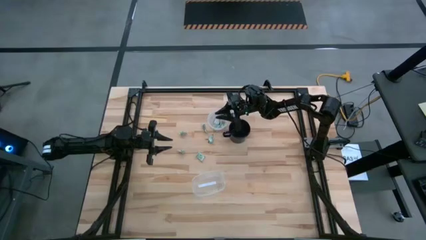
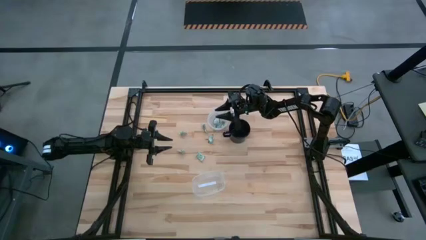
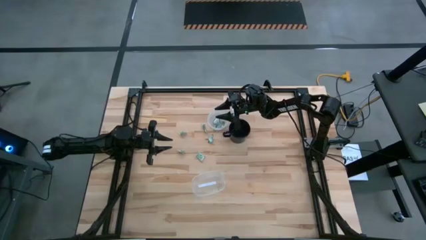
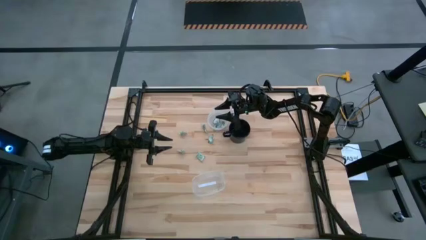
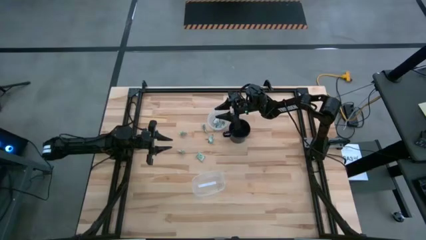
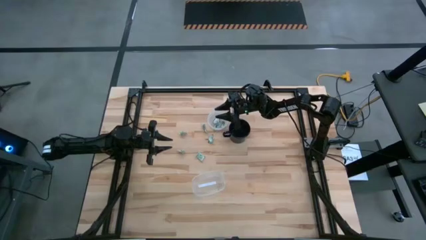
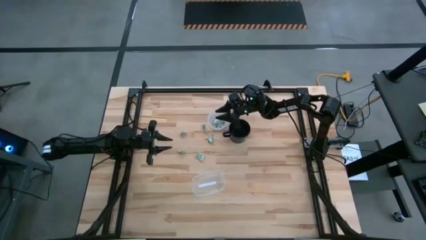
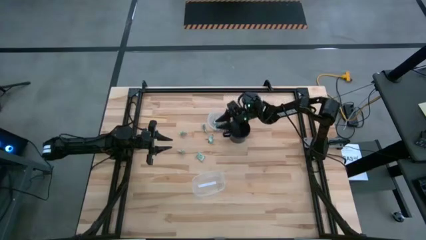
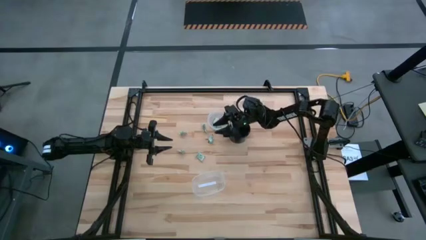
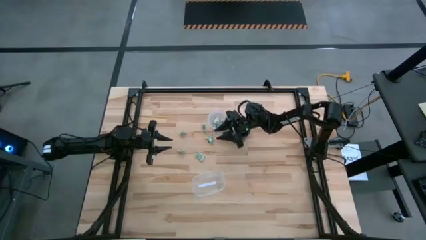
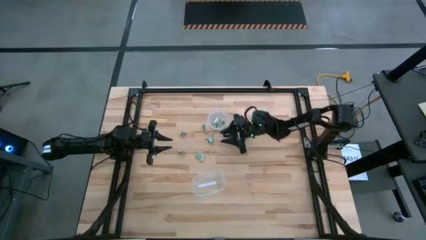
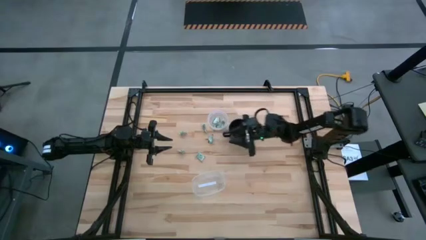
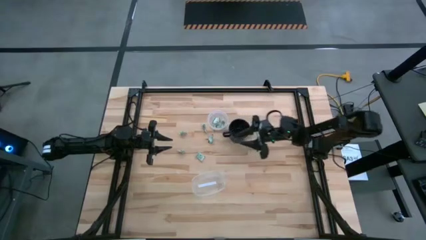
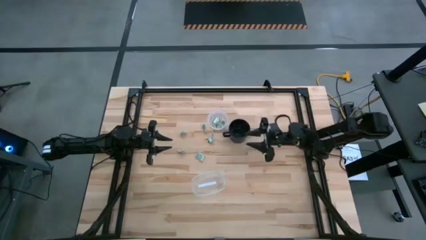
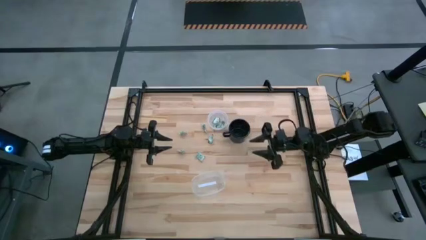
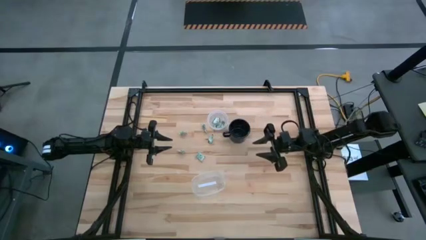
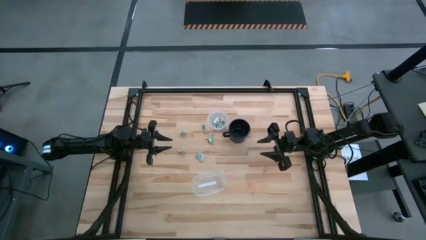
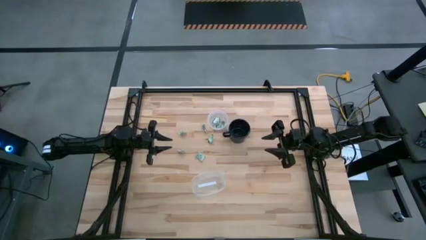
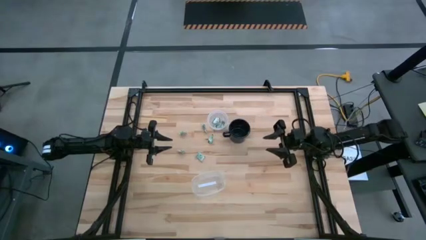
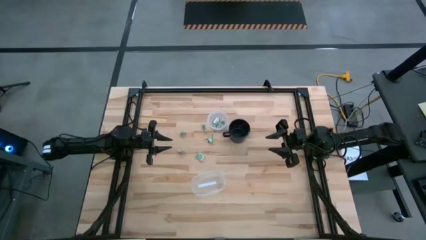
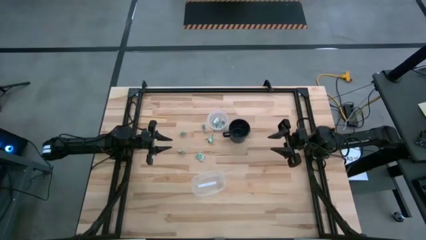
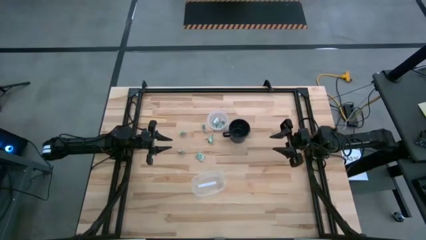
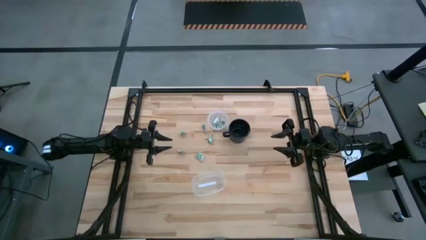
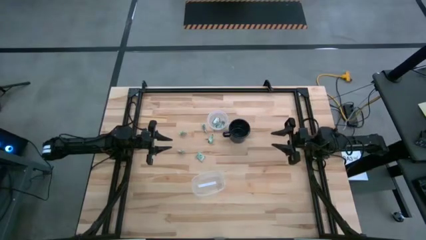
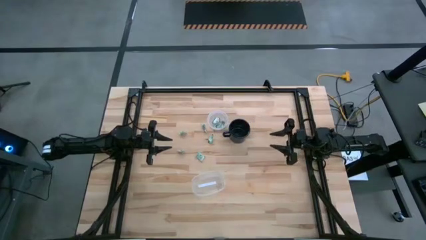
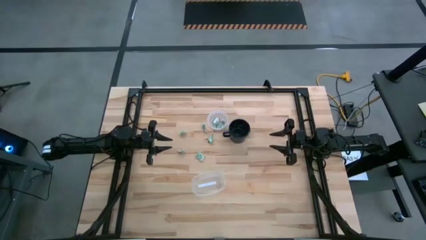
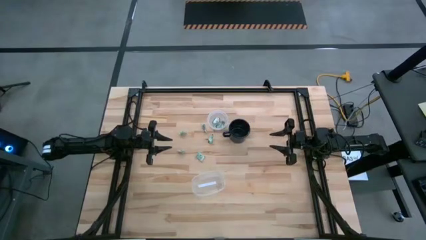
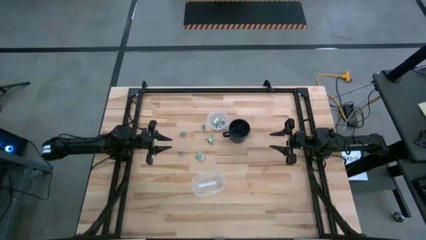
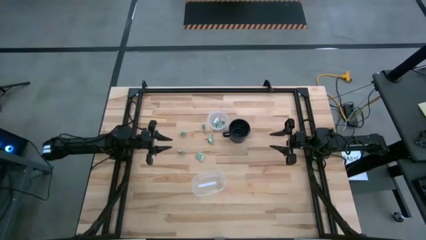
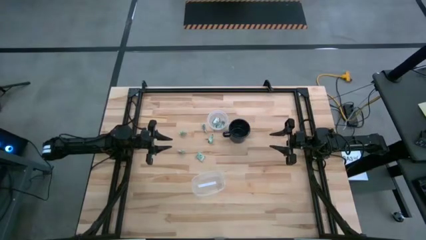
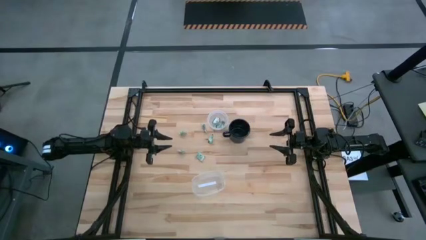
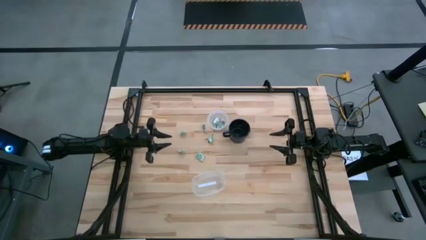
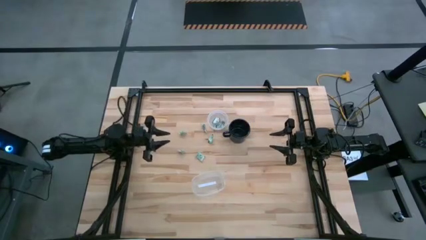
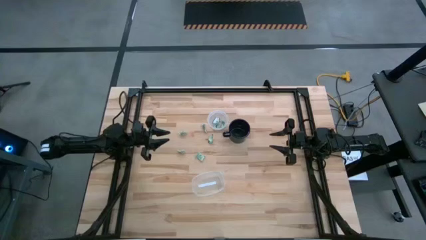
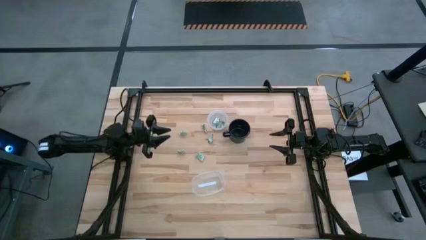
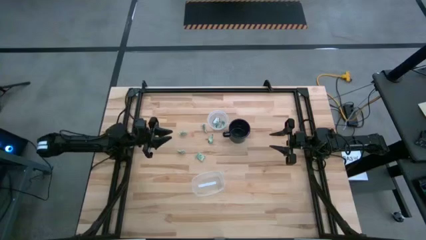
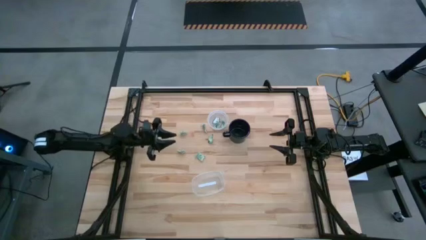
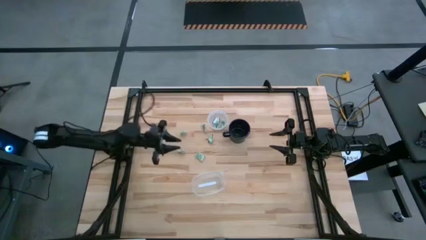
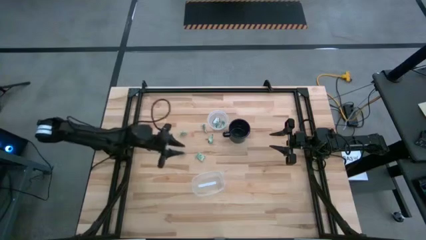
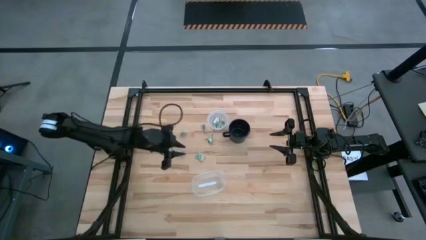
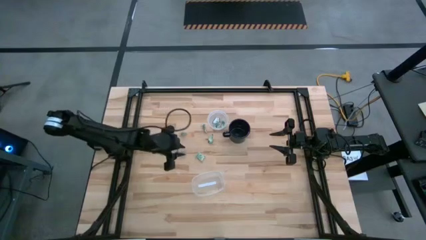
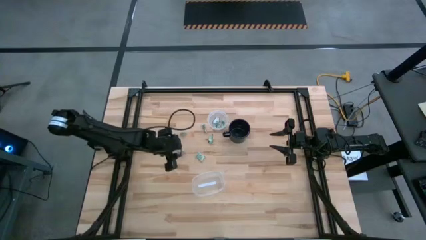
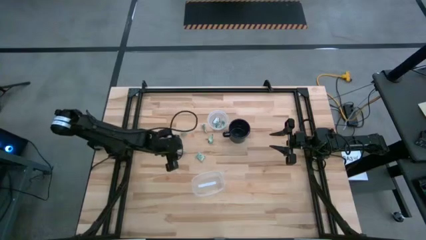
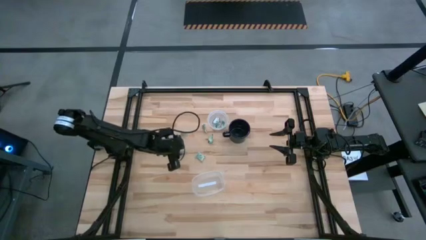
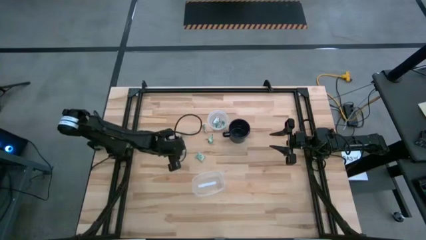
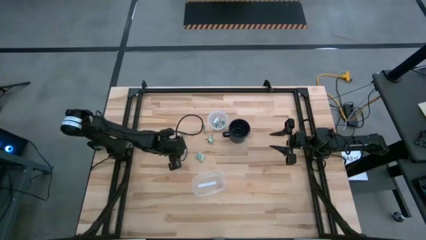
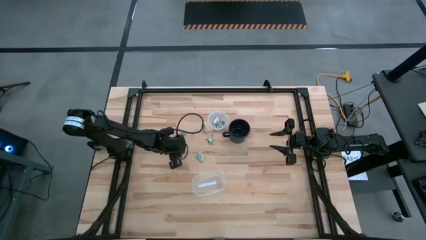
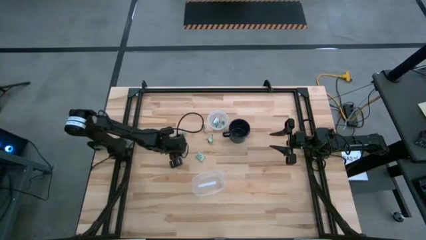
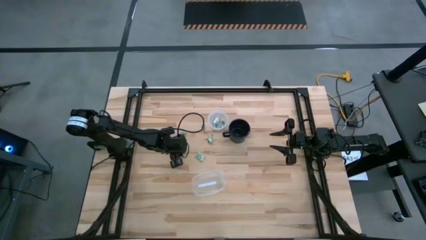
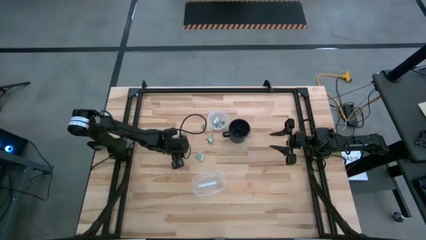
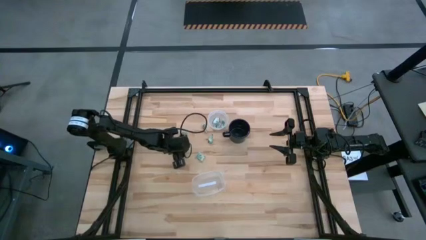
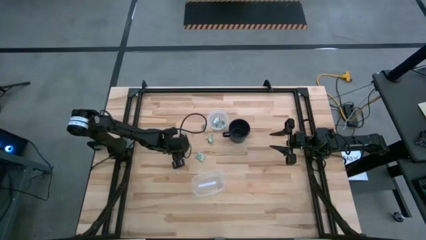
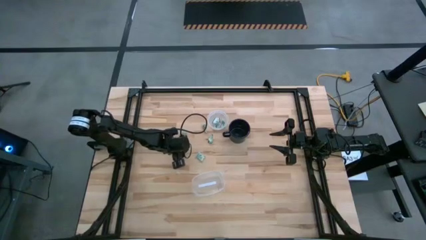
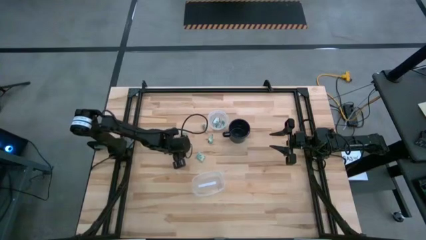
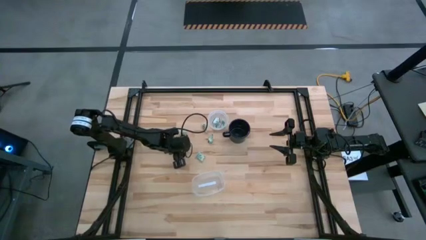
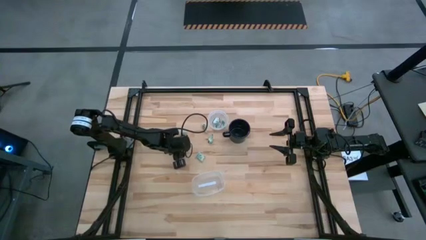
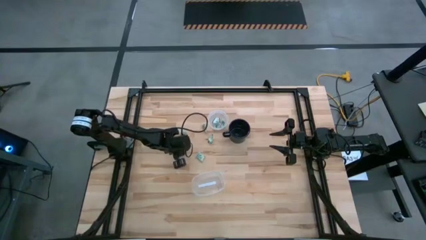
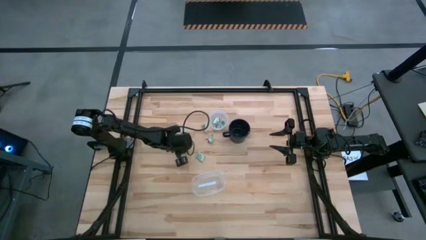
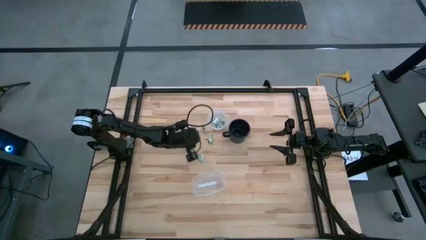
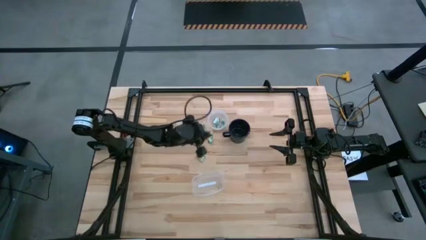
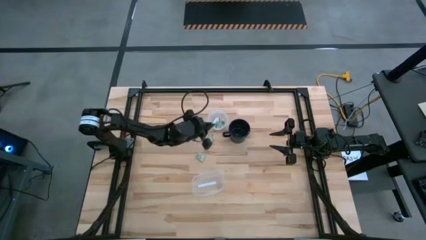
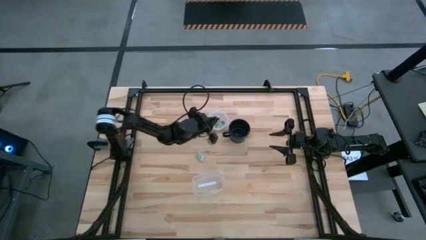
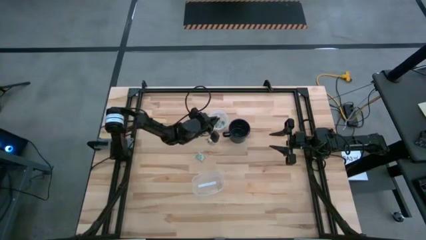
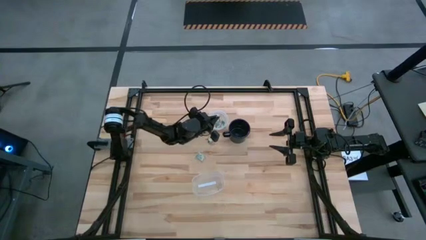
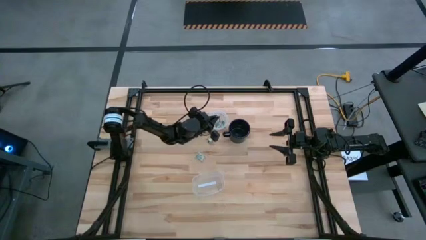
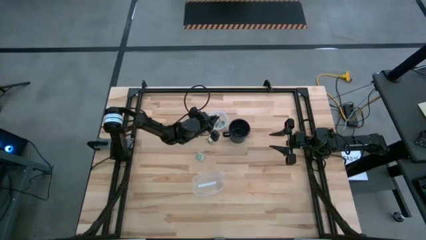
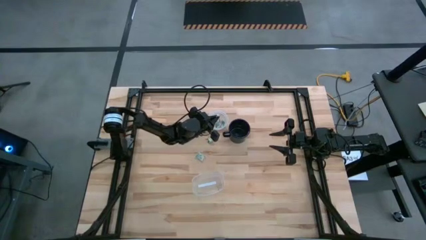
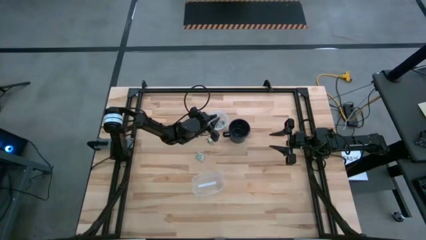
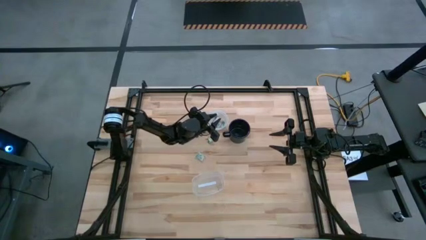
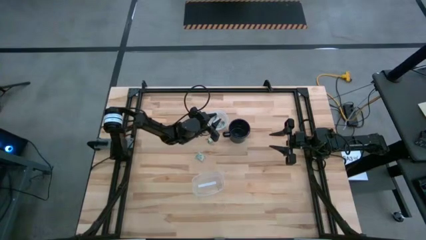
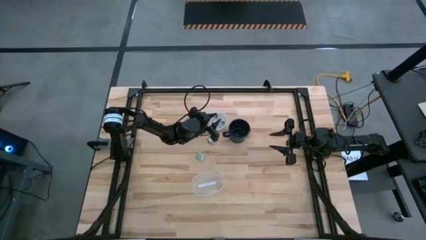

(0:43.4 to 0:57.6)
Task: Pick and place Stevia / Truvia into bins
Put the stevia packet into the top transparent container

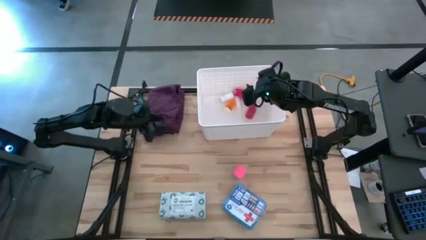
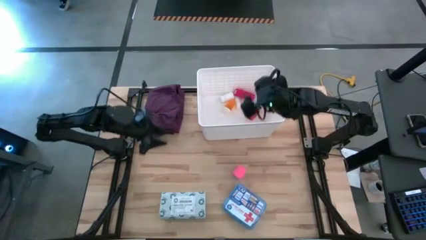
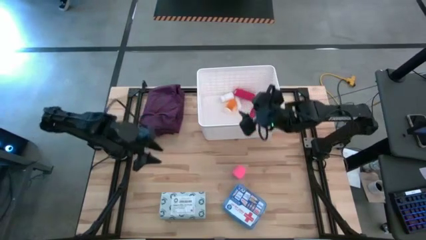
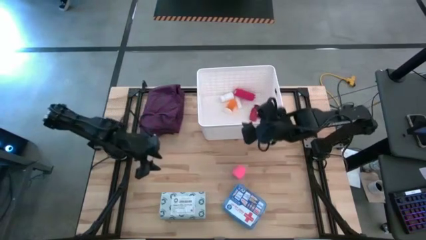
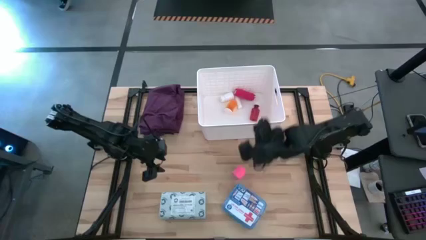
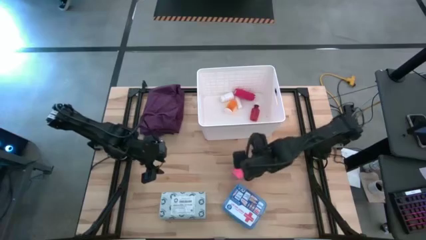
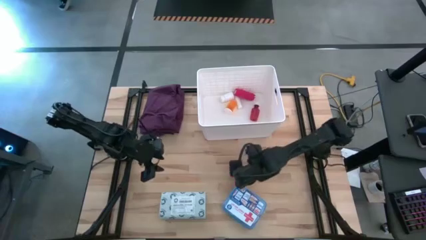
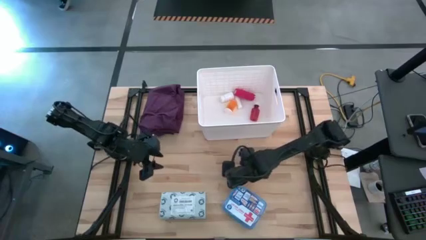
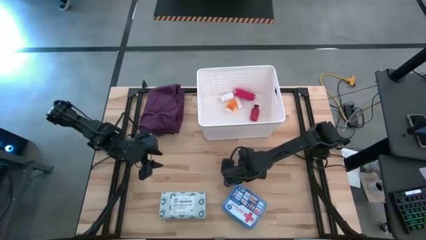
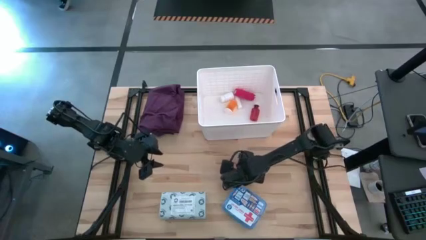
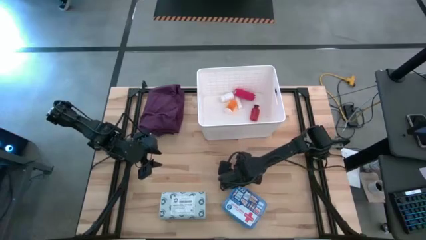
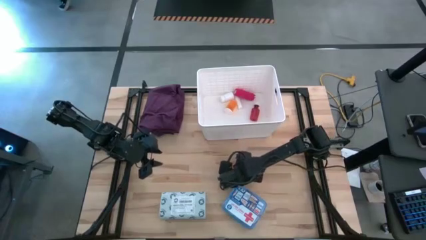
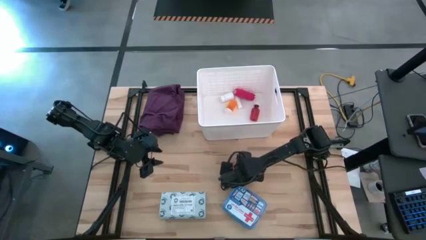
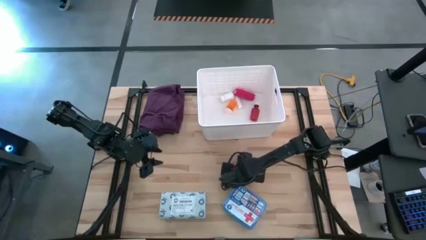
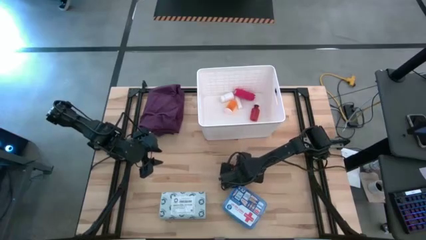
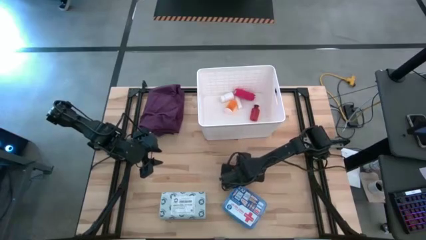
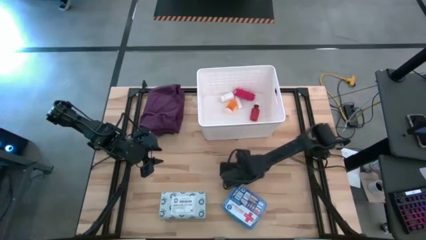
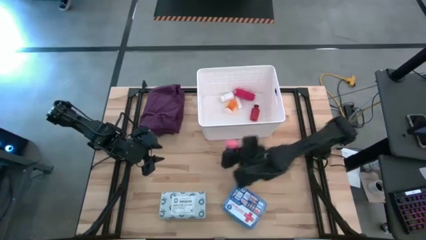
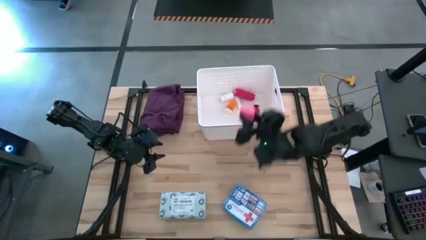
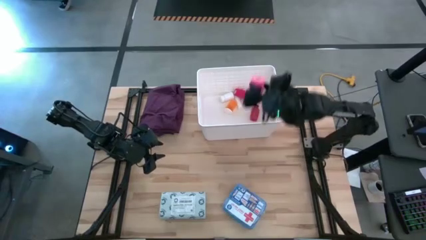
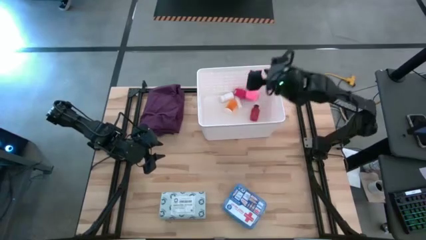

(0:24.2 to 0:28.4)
Task: Pick & place medical supplies in basket/bin
Put the pink bandage into the bin
